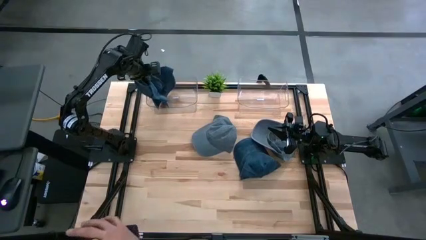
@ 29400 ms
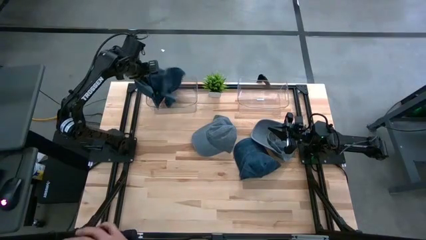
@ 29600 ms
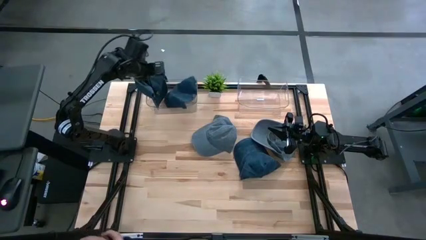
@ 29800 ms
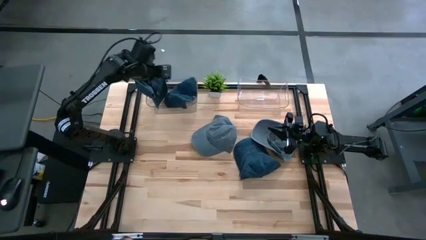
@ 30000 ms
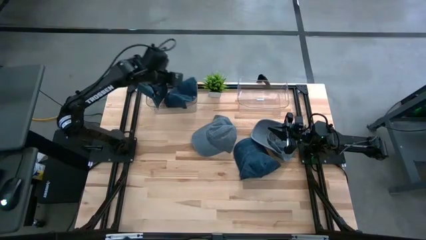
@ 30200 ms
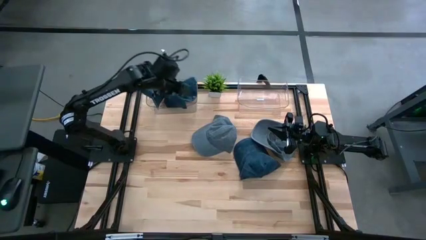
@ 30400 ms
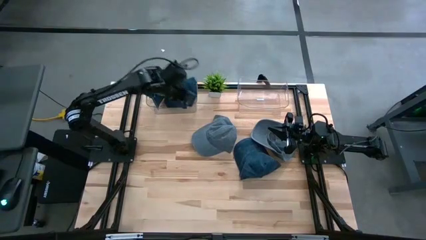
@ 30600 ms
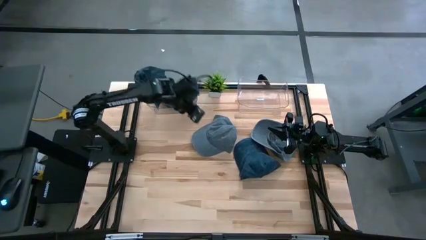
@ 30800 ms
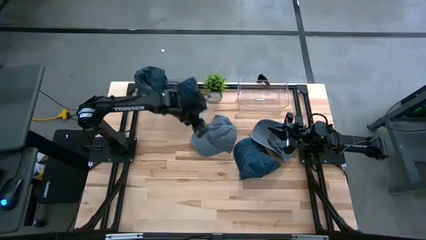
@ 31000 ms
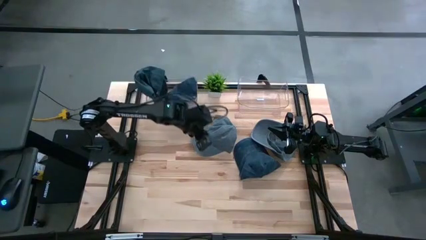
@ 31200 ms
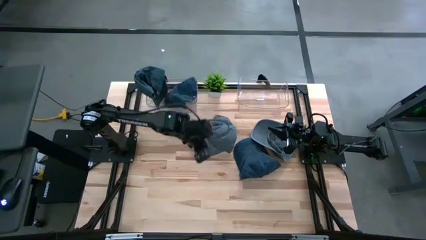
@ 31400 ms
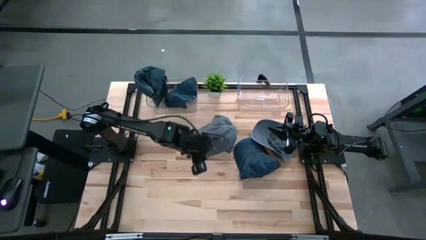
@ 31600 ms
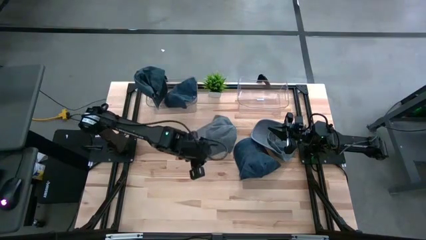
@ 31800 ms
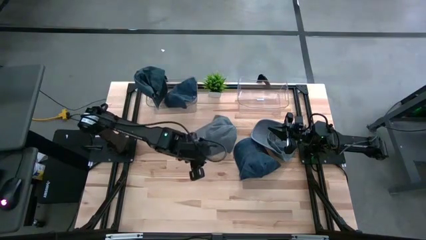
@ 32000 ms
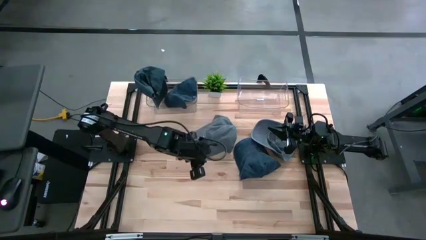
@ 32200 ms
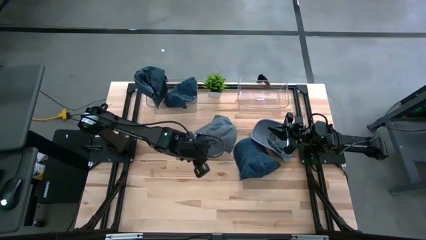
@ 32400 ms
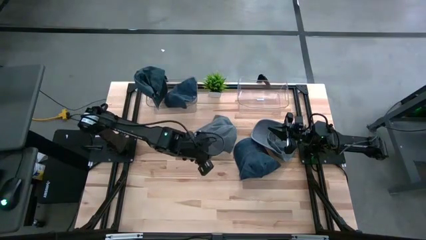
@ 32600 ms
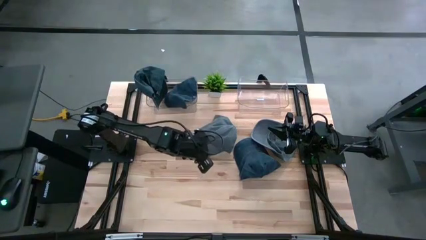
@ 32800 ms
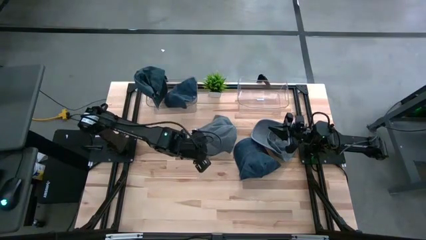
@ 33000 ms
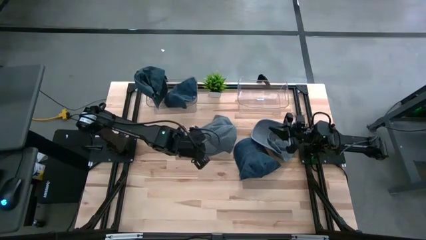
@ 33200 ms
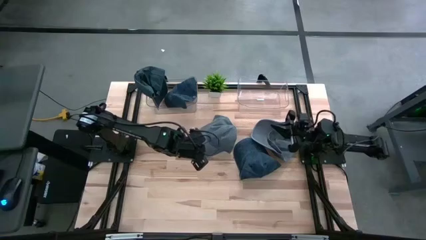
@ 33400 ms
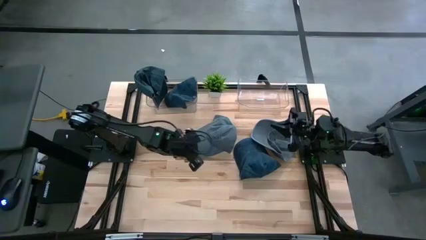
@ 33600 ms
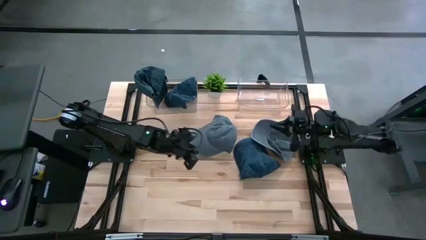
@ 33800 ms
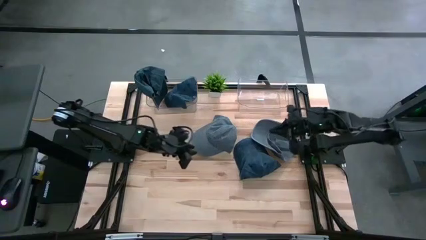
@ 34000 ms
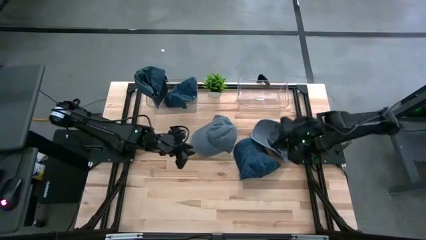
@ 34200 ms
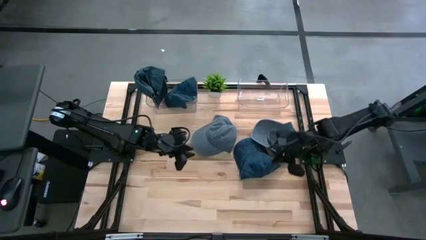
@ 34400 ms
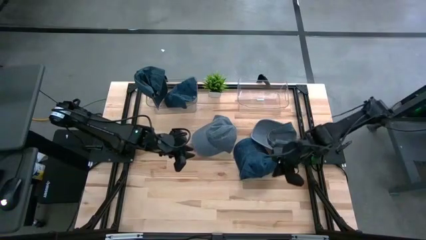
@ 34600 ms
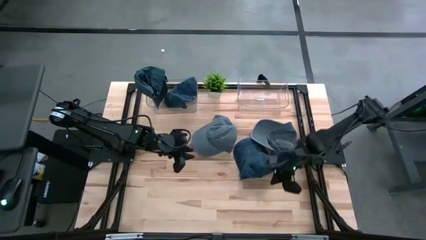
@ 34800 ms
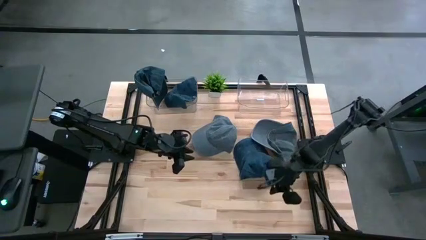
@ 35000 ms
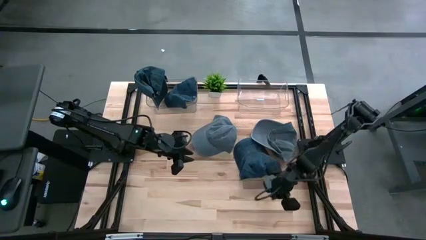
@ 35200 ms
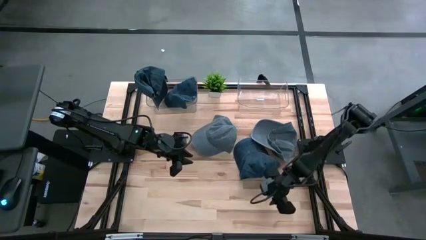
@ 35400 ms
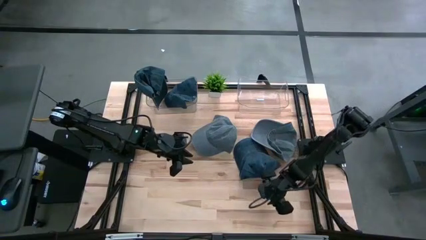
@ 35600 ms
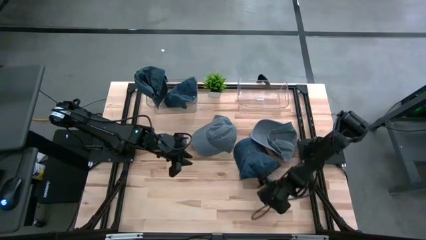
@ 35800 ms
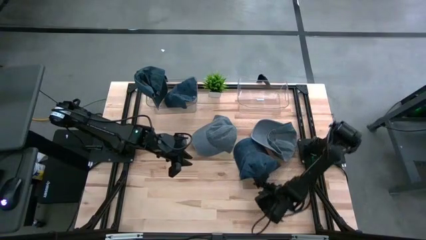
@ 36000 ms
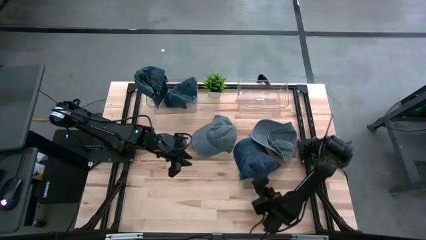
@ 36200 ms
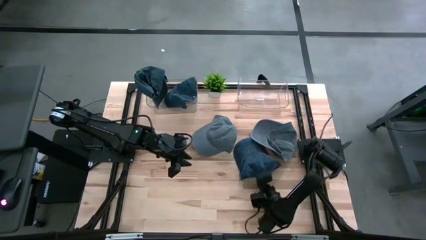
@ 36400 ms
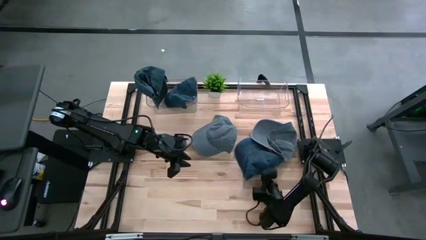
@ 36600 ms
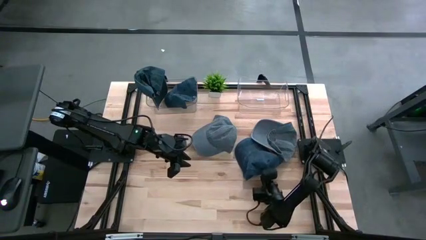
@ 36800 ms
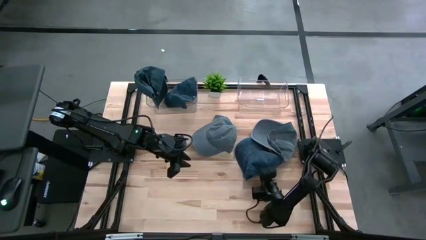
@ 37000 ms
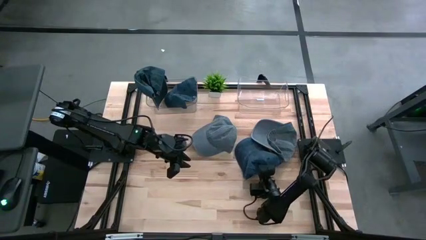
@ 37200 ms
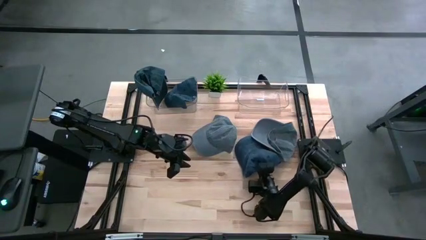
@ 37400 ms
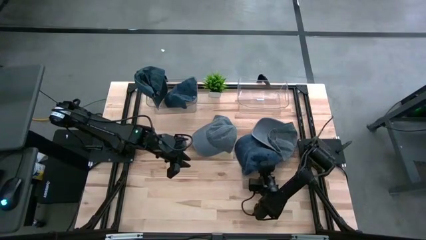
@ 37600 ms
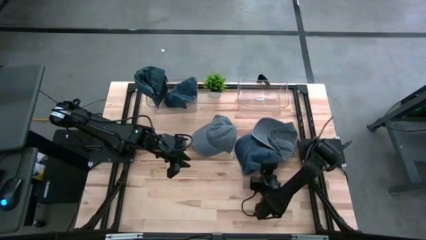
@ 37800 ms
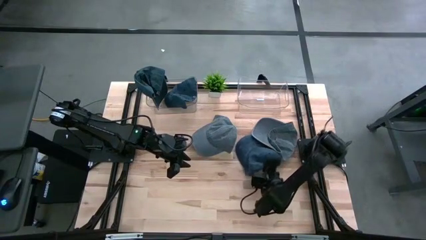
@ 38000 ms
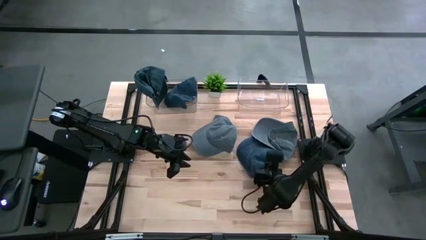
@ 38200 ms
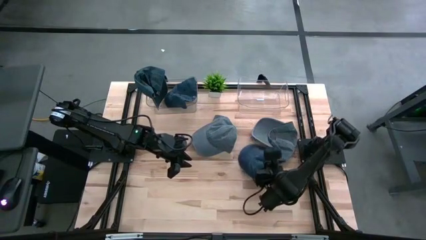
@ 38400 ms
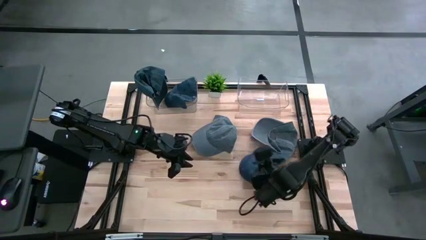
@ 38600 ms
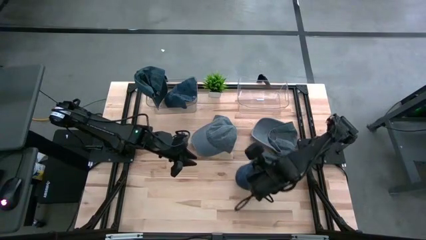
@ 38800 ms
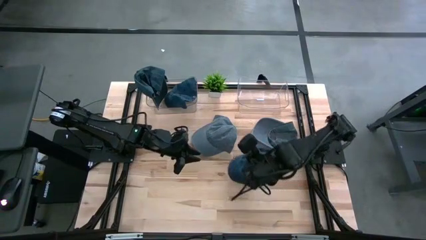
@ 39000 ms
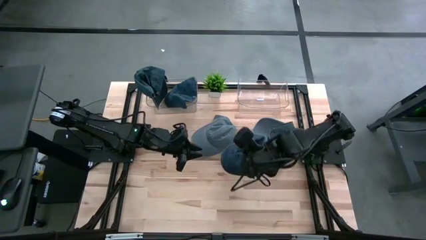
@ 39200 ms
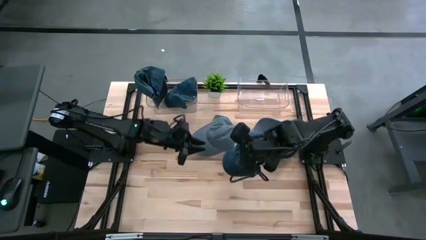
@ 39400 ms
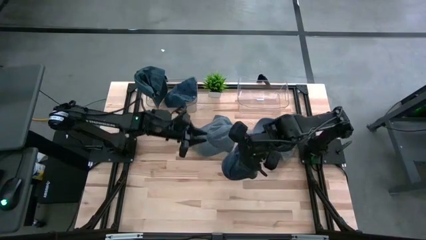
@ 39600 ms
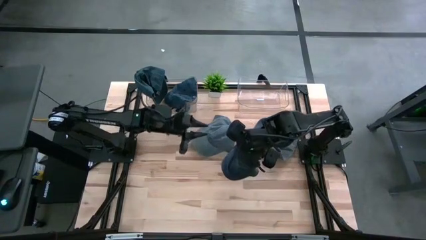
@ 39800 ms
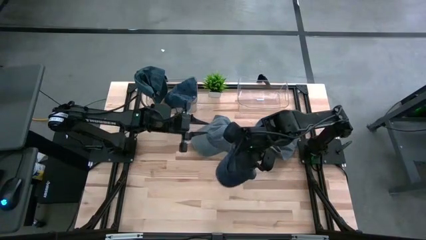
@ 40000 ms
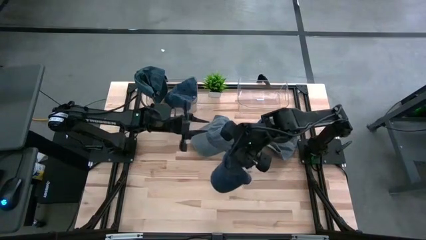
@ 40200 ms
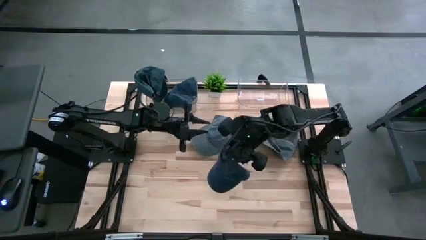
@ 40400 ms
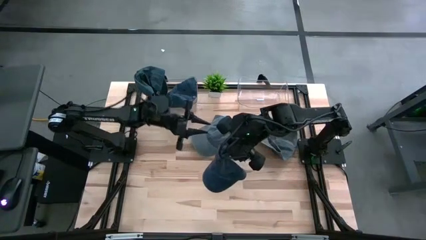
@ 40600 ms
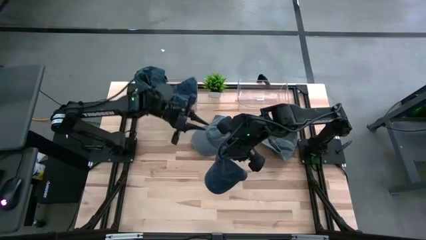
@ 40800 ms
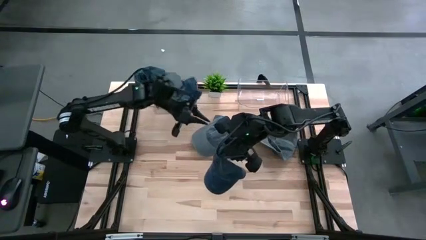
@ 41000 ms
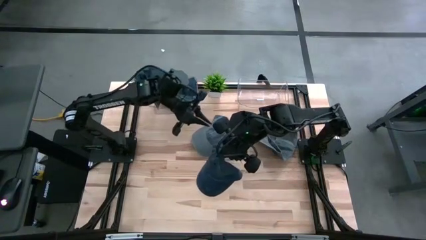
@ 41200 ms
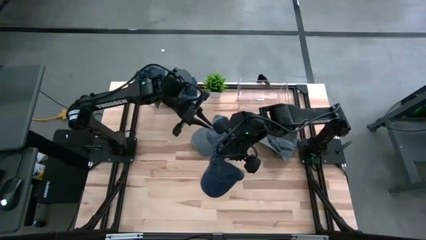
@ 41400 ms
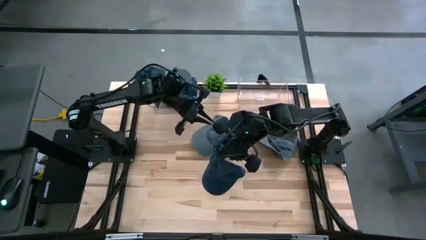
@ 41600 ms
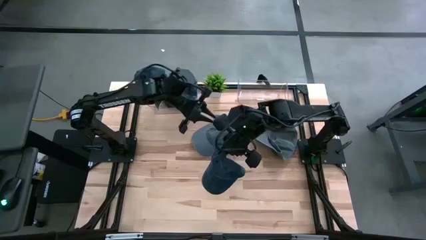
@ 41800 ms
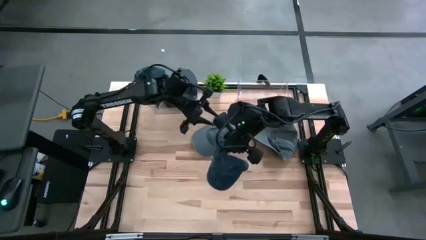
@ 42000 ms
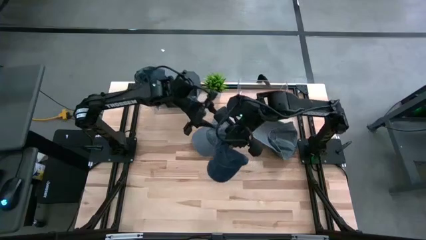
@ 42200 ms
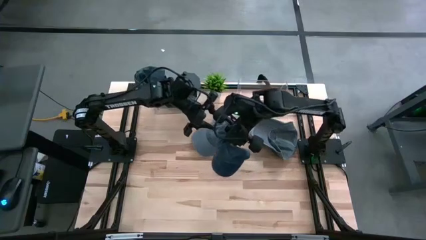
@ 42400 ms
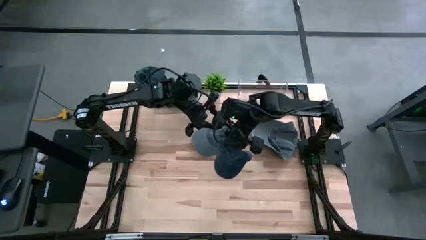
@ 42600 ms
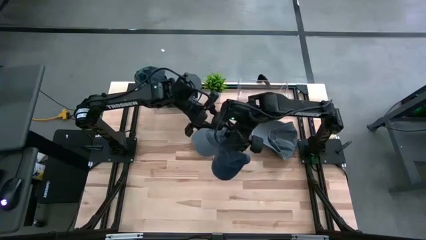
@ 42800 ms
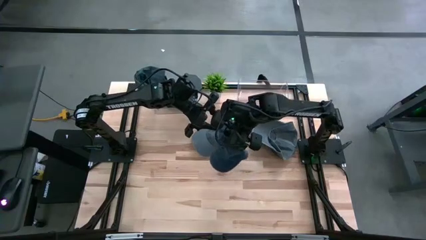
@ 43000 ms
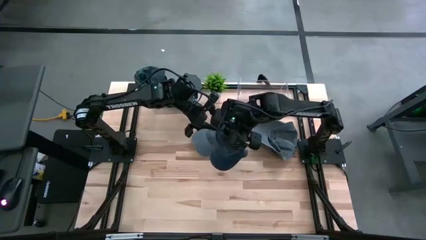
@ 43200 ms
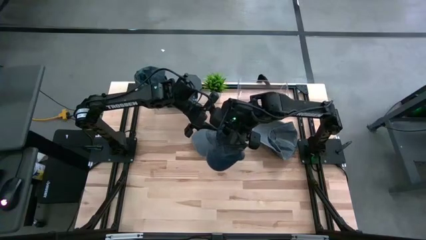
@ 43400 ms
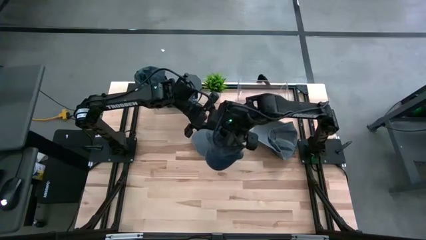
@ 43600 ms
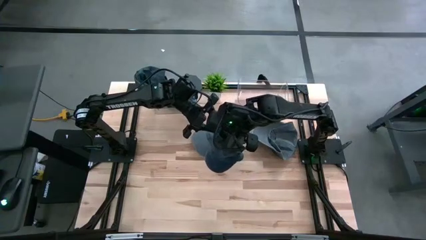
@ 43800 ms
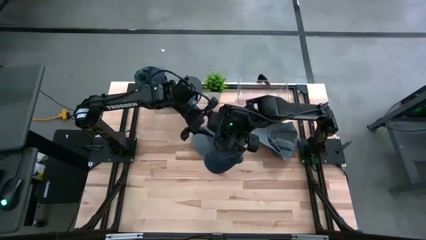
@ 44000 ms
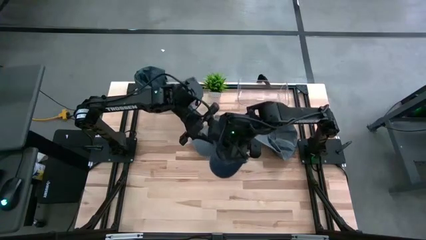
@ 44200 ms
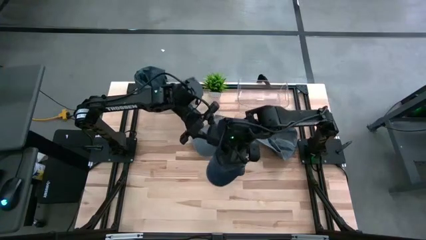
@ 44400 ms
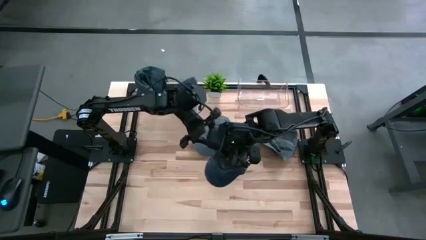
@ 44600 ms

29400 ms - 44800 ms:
Task: Pick & Place hat
Put the dark blue cap into the left transparent bin
